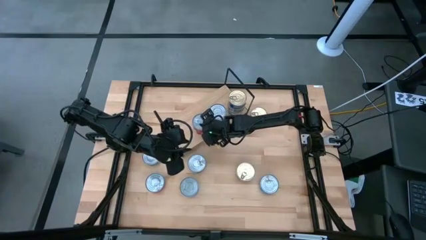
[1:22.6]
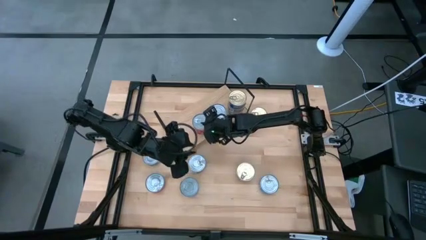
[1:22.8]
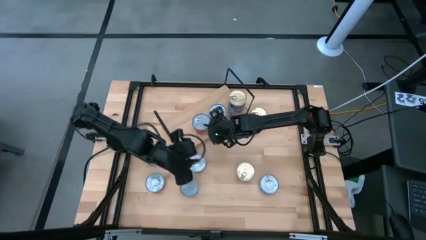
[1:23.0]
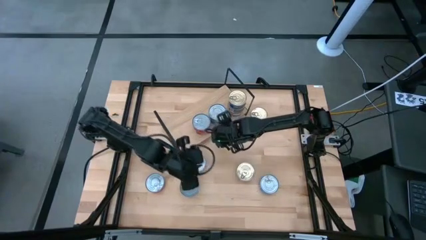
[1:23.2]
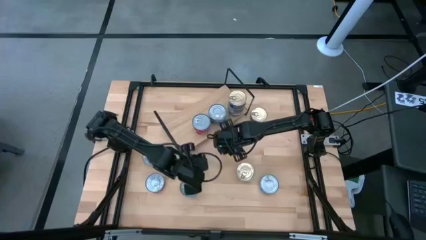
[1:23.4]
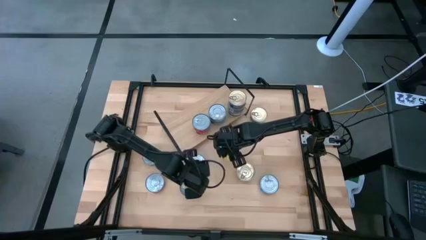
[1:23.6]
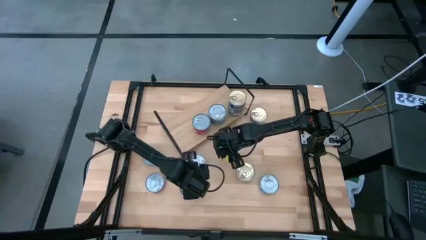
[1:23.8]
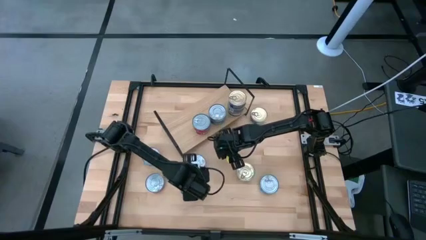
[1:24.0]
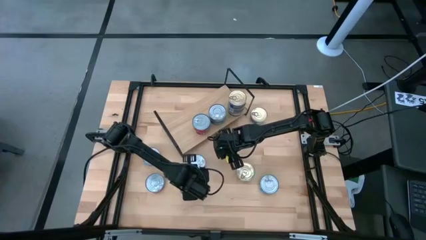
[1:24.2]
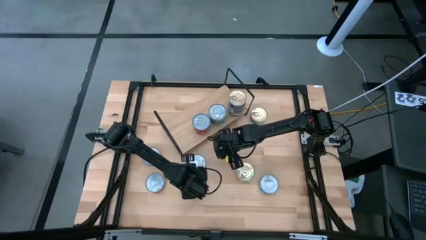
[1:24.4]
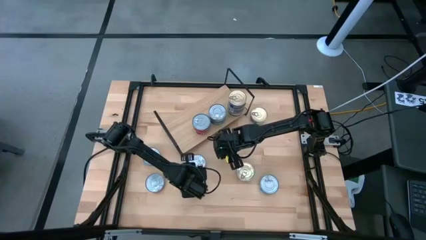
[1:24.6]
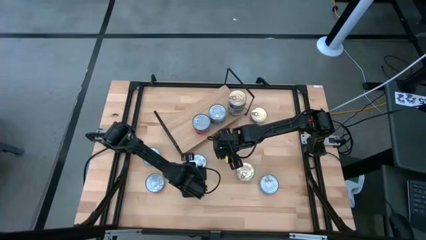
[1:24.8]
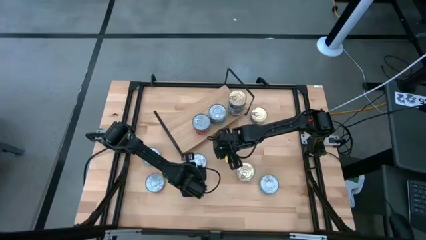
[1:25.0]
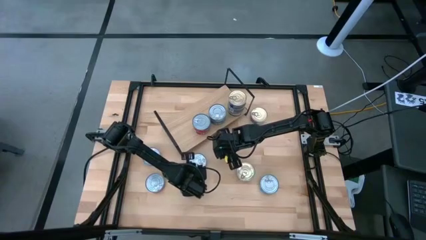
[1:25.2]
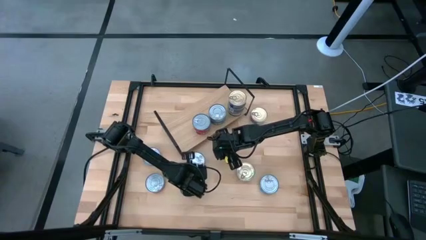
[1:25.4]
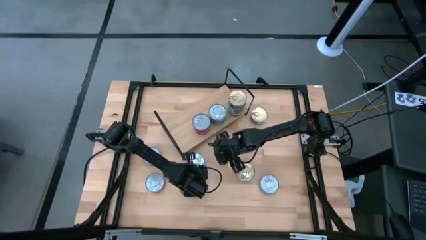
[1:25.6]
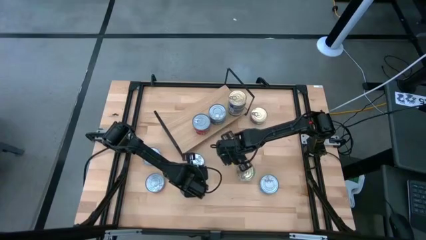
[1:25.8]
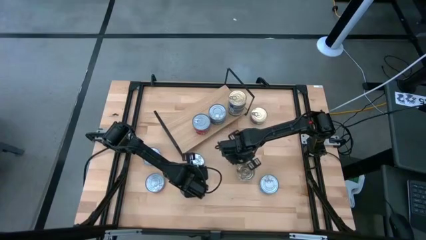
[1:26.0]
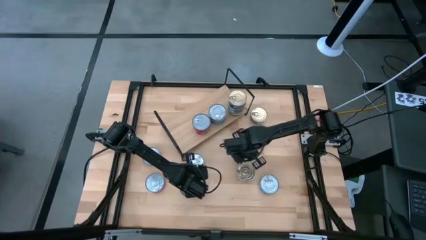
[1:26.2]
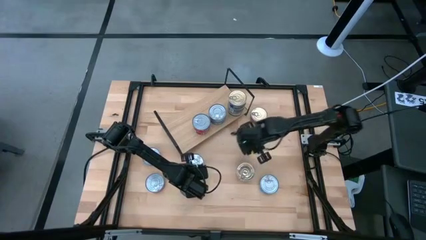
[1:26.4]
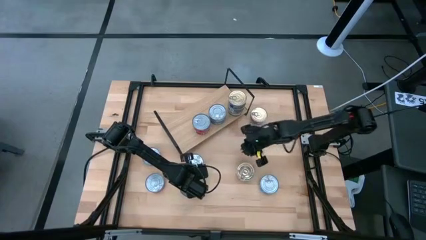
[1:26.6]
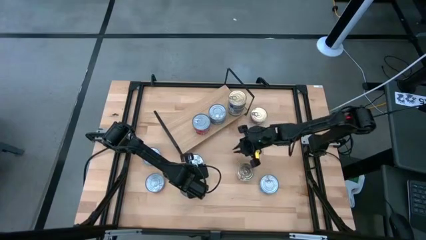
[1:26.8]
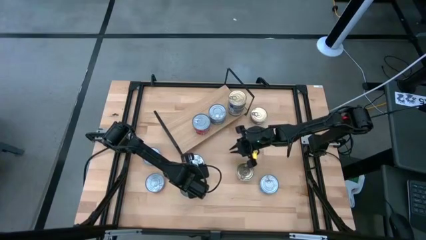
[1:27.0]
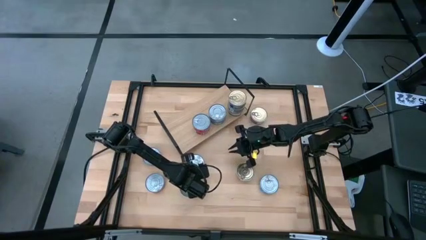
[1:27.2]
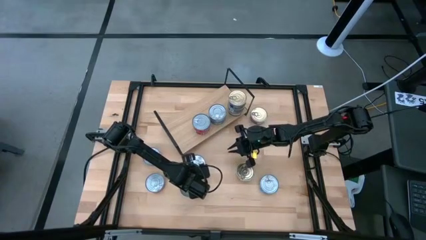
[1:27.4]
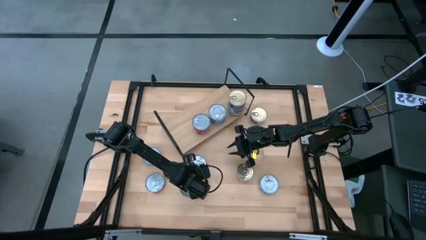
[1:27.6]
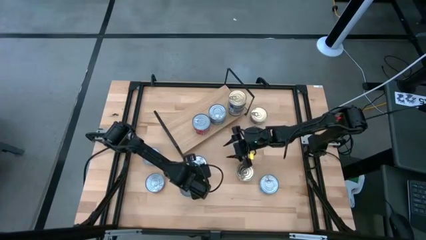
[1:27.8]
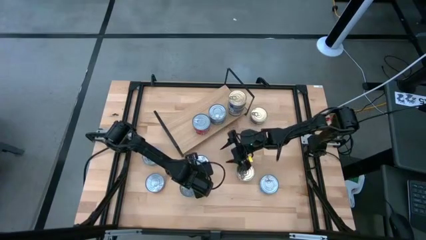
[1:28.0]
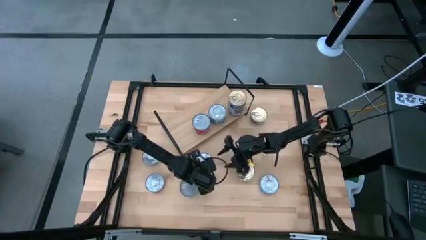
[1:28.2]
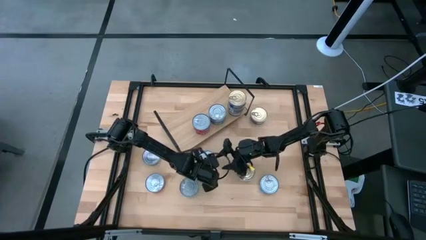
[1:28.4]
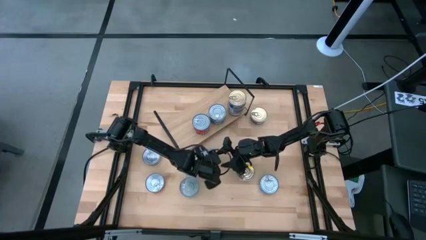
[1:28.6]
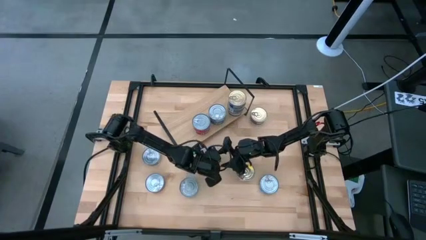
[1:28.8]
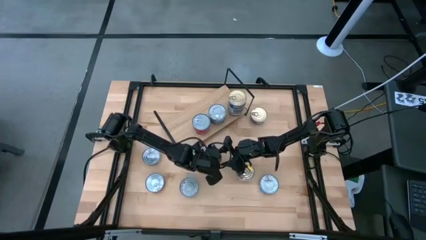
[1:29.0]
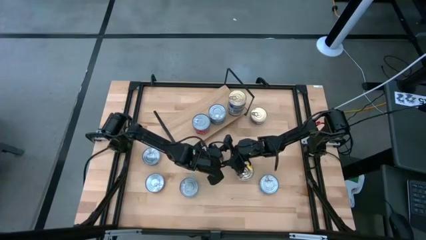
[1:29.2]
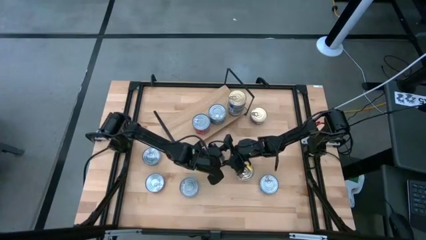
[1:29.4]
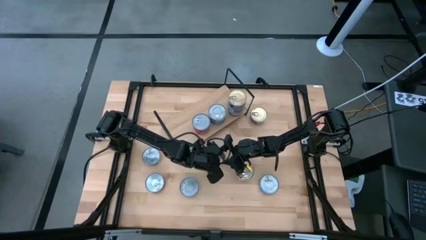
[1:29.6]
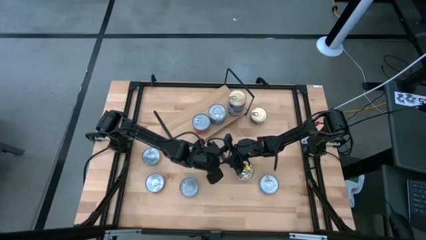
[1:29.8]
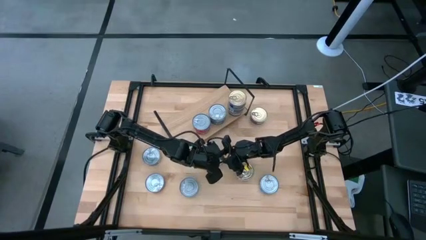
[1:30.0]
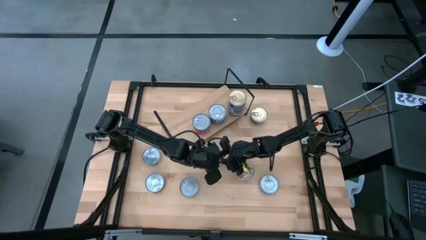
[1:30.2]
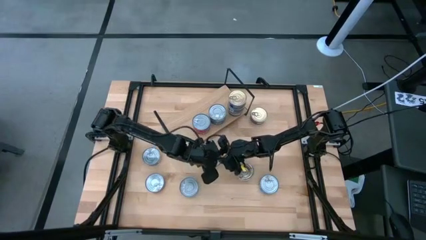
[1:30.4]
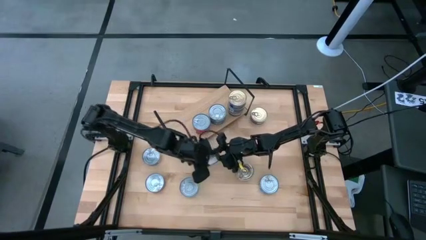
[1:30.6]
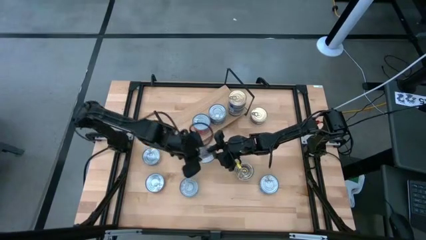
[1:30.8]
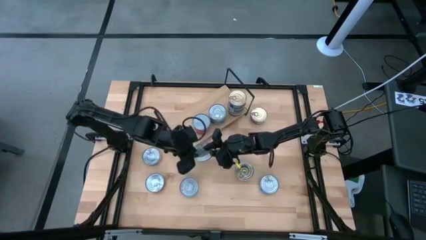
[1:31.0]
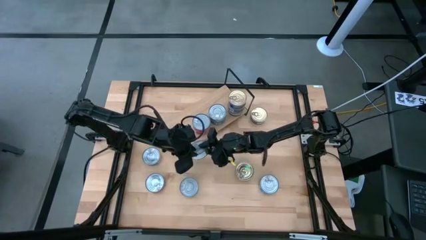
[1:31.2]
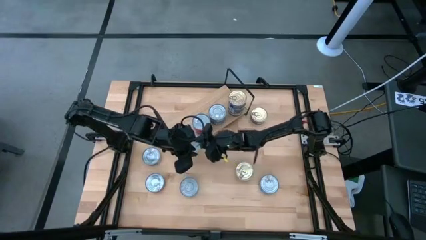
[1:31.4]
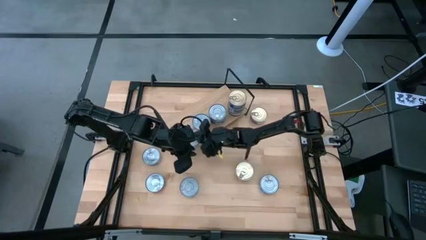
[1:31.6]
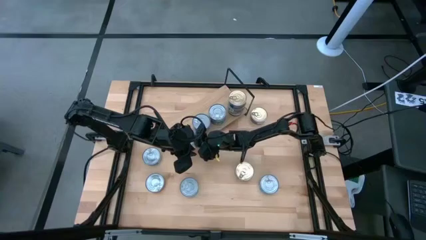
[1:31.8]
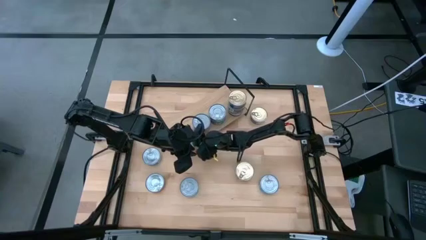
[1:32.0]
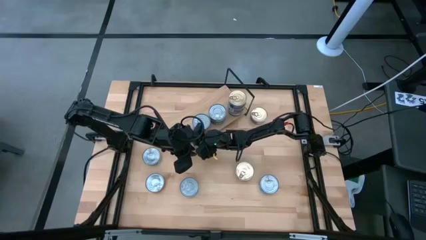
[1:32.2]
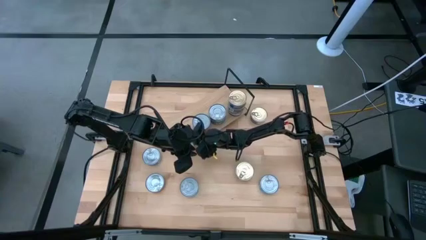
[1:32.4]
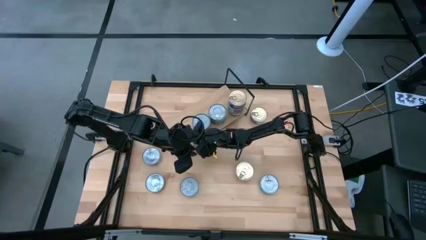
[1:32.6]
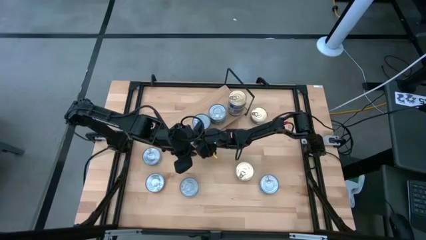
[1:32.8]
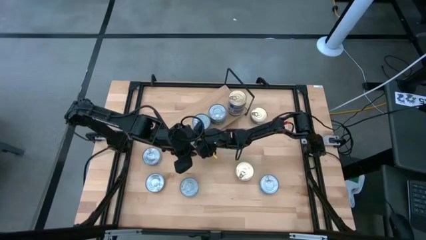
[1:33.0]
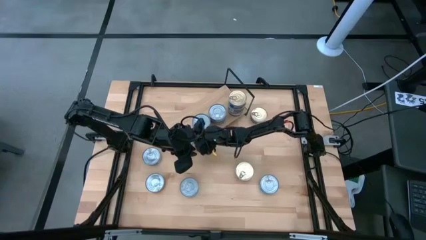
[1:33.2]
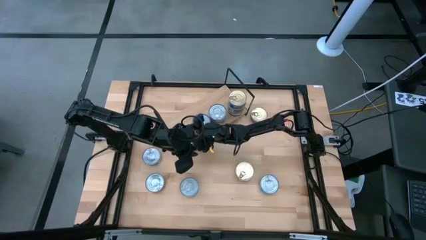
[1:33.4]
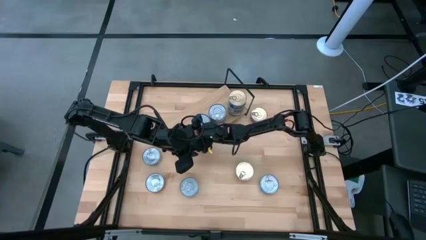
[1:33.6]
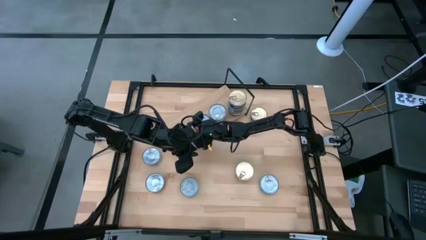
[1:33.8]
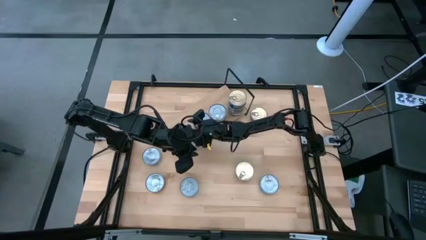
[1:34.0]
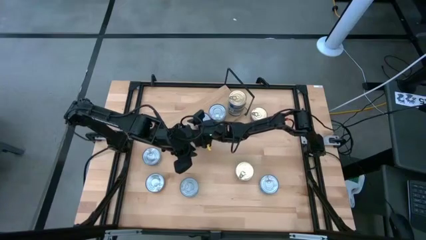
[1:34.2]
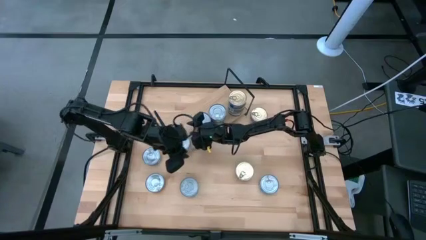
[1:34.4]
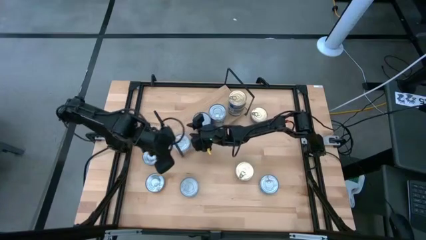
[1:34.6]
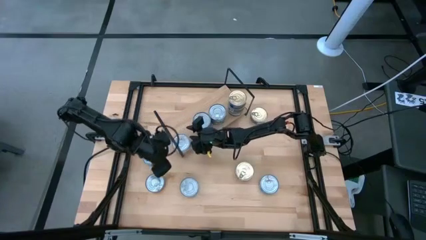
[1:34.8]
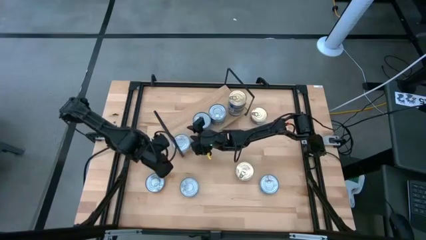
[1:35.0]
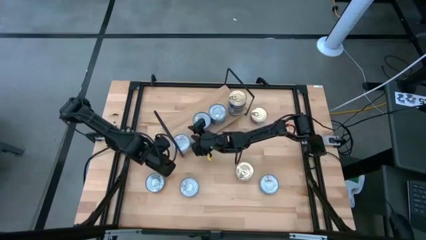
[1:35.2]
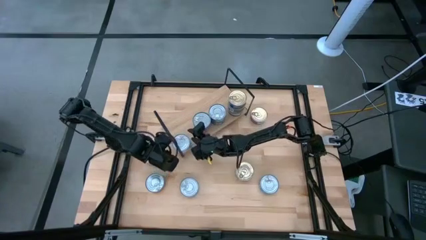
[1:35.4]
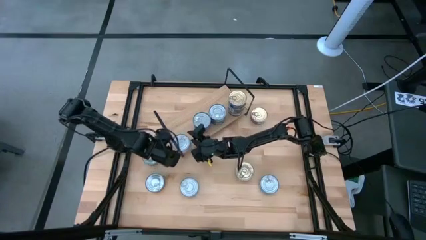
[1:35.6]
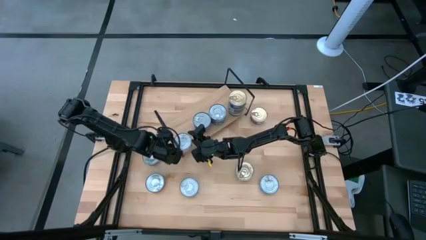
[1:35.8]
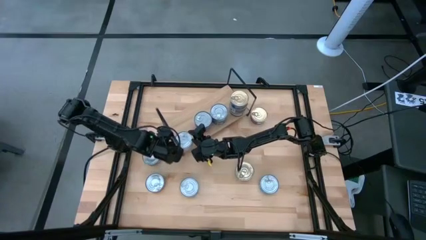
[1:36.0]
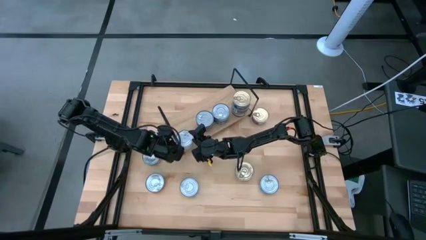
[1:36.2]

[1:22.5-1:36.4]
Task: Stack canned seafood by type on shelf
Put the green tuna can on the shelf

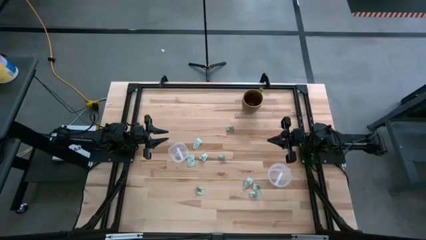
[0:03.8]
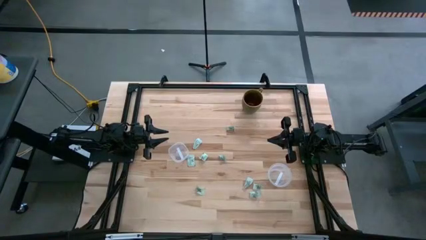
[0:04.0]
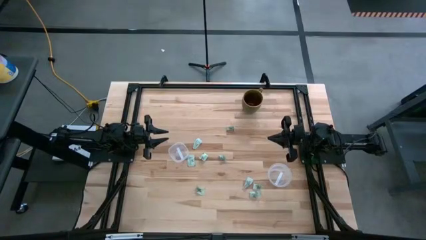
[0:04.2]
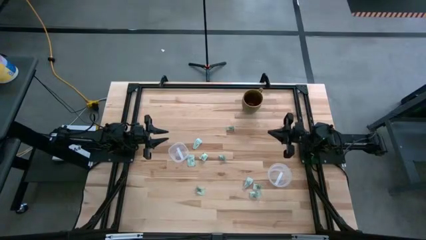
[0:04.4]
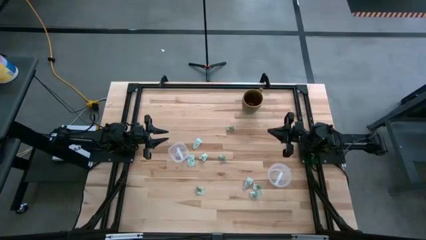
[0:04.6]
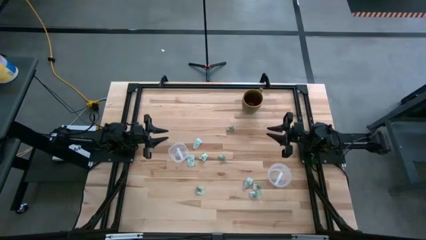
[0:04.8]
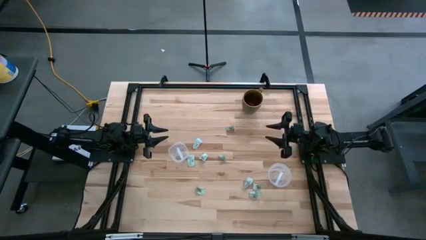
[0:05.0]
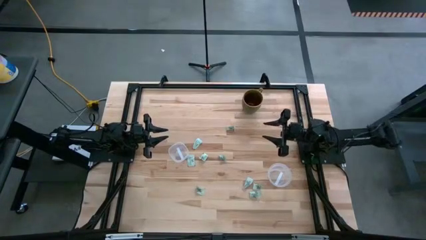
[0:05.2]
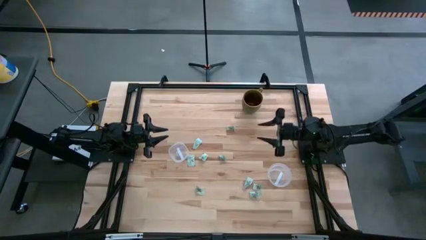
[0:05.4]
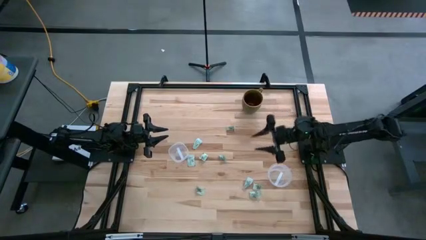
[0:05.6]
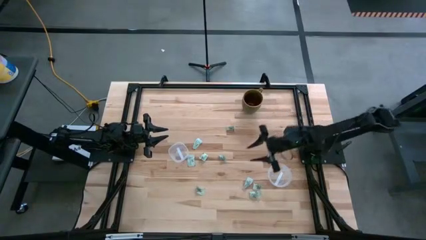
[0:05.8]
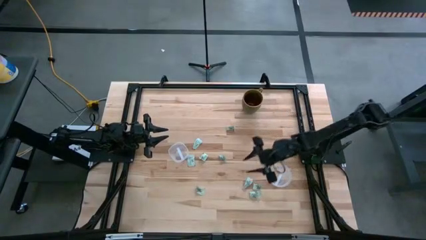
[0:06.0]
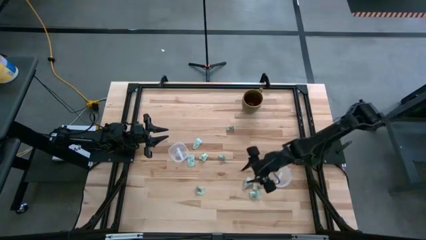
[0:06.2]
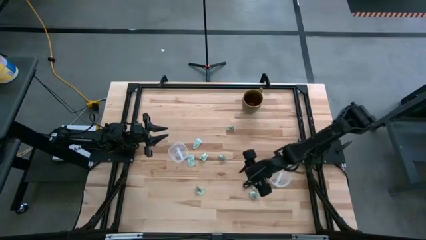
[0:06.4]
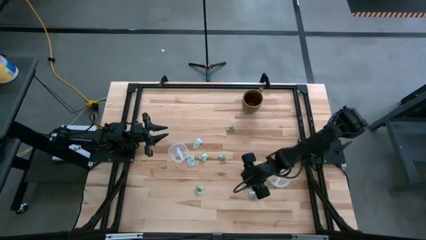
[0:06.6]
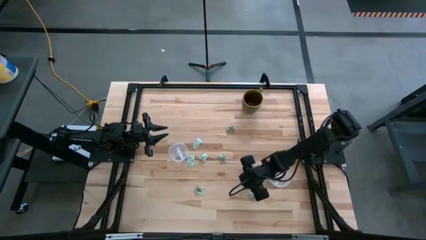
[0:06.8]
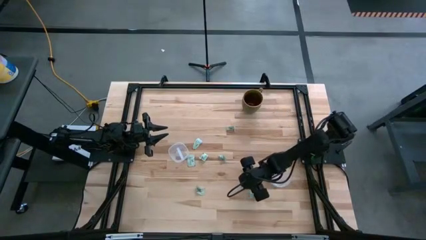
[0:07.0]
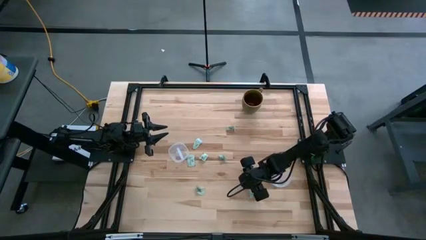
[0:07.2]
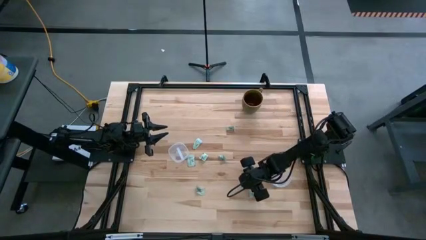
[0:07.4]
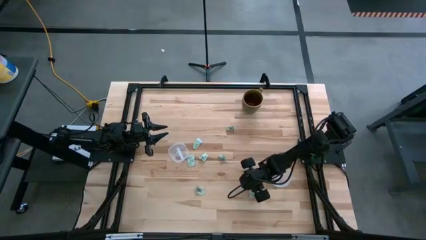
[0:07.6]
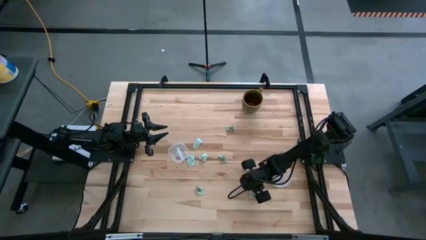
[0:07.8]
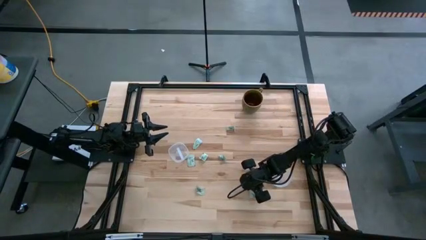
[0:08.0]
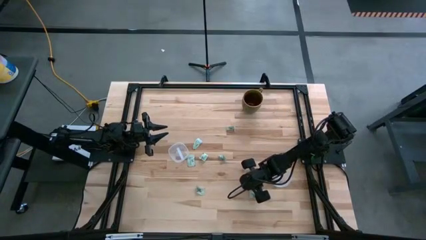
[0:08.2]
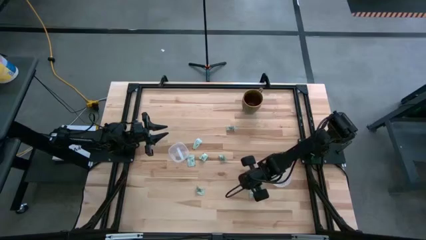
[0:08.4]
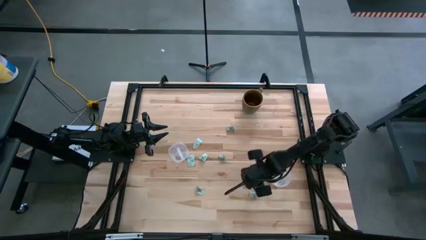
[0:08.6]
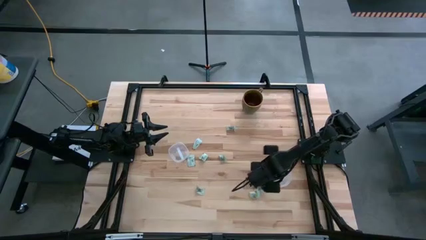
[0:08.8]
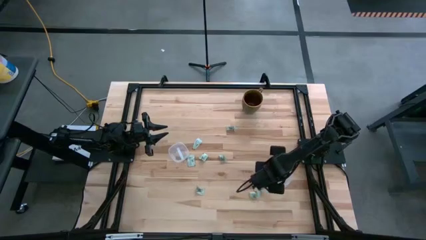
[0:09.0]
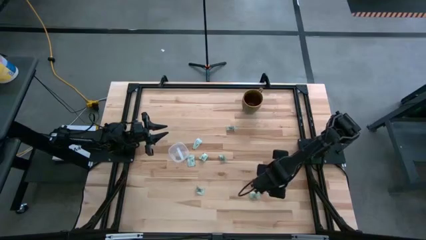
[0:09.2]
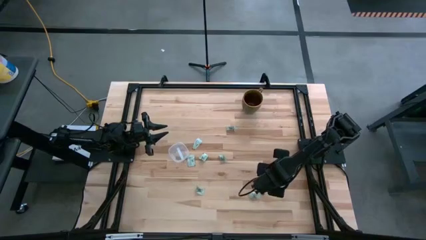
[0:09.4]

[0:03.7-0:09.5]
Task: Pick and place Stevia / Truvia into bins
Put the stevia packet into the round transparent container
